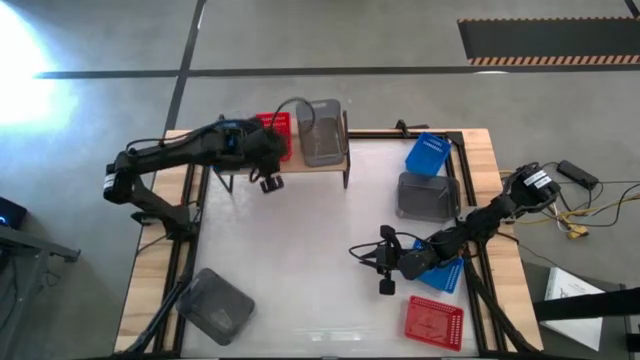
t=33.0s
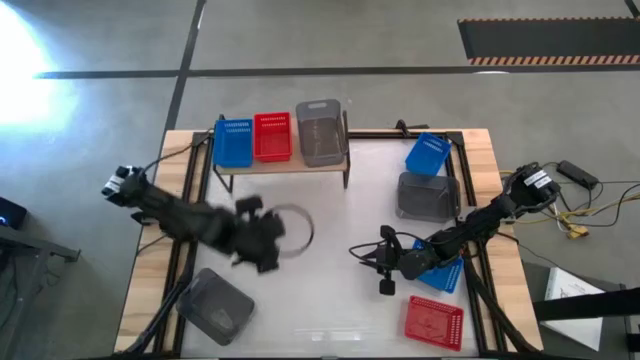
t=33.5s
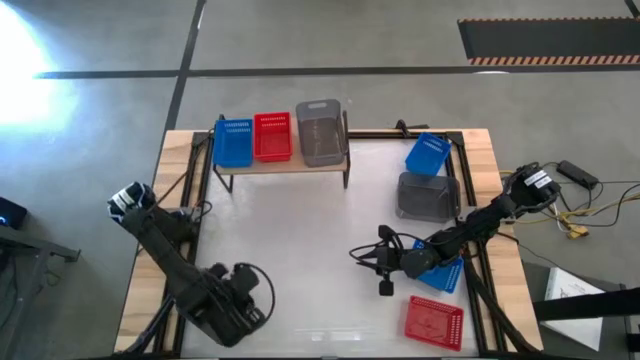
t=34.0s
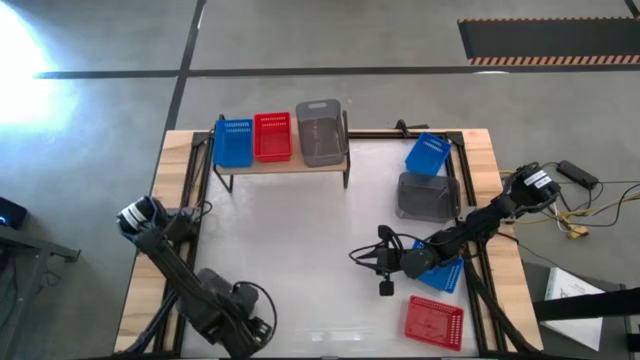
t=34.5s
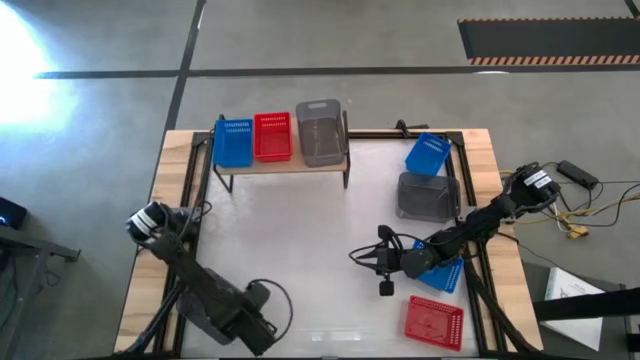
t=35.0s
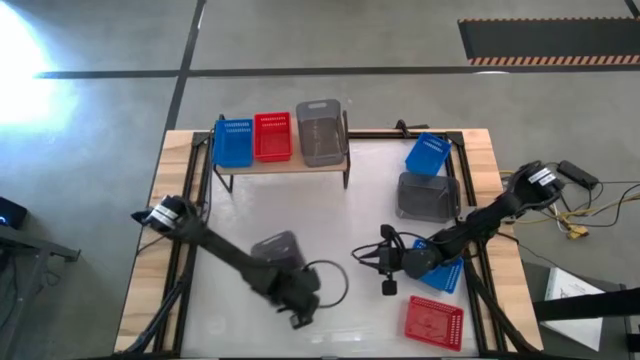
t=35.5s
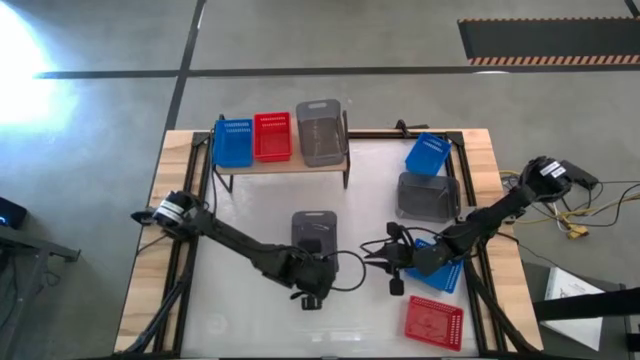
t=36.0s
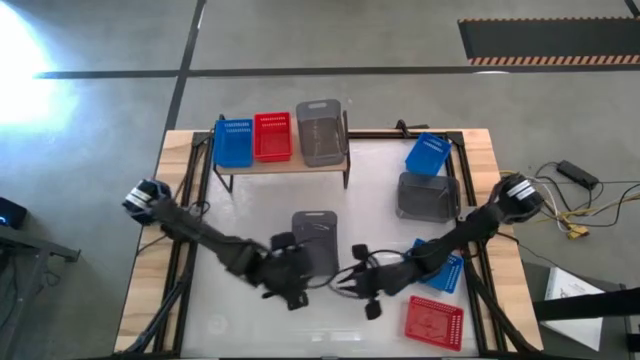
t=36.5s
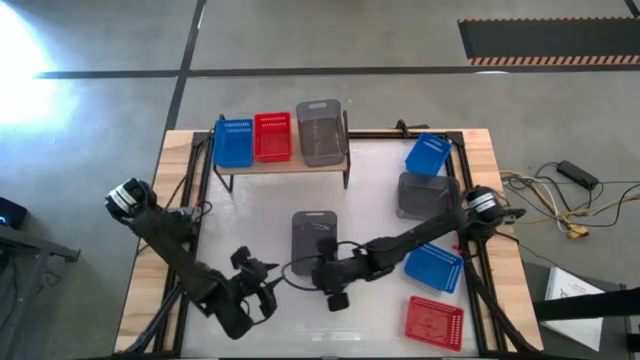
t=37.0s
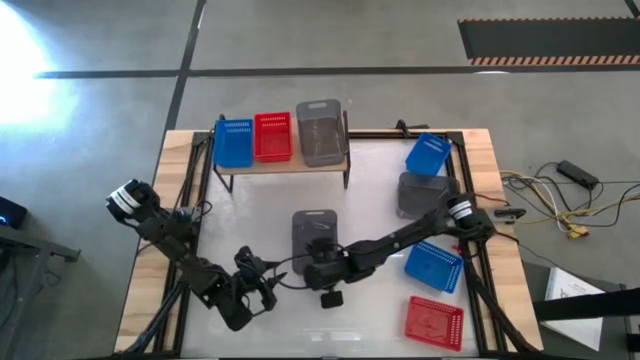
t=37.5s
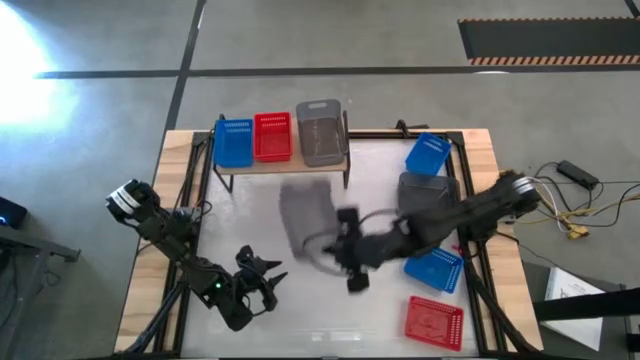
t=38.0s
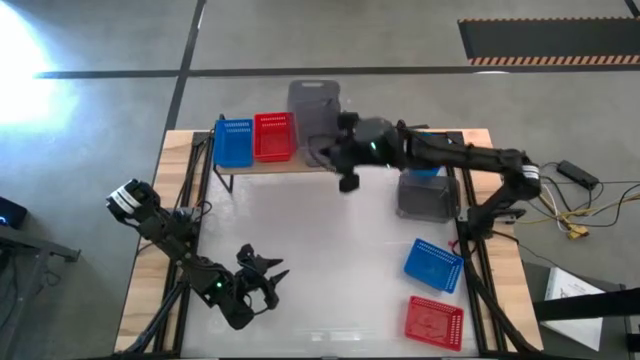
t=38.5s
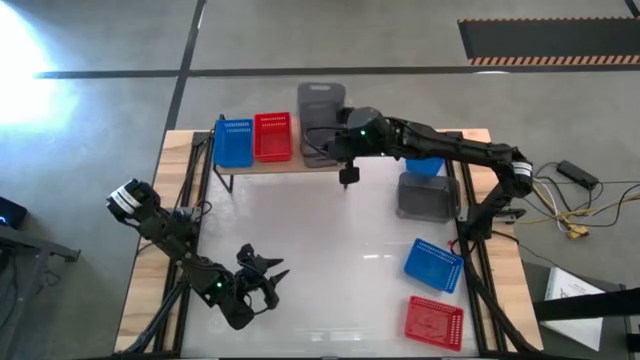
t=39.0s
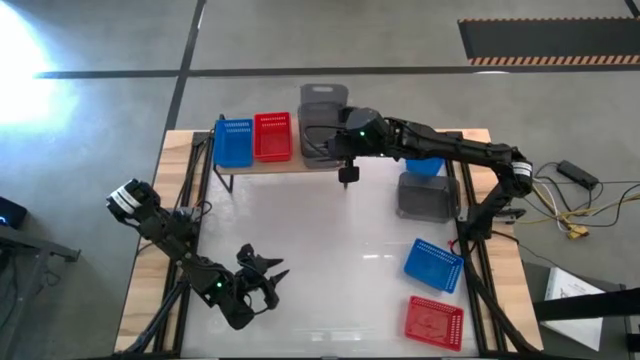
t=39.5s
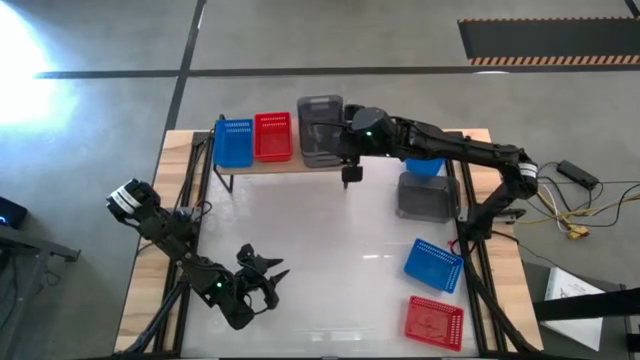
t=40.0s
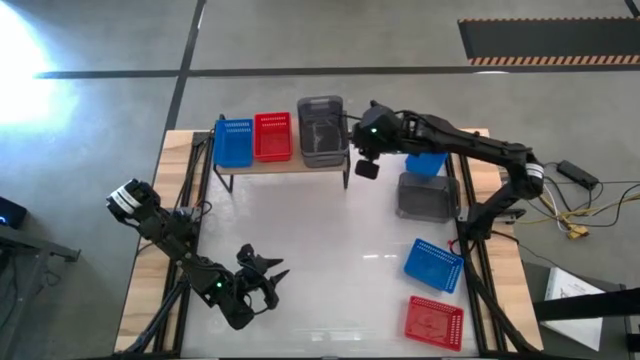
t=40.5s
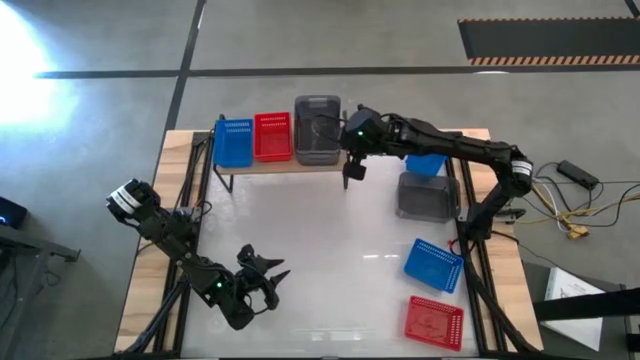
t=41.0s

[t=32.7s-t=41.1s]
Task: Stack baskets on shelf by color
Stack the bottom black bin on top of the black bin on the shelf

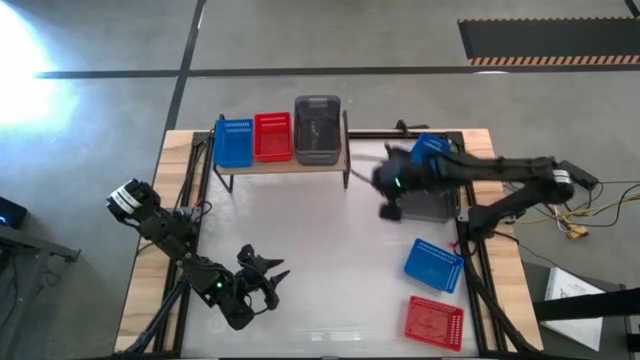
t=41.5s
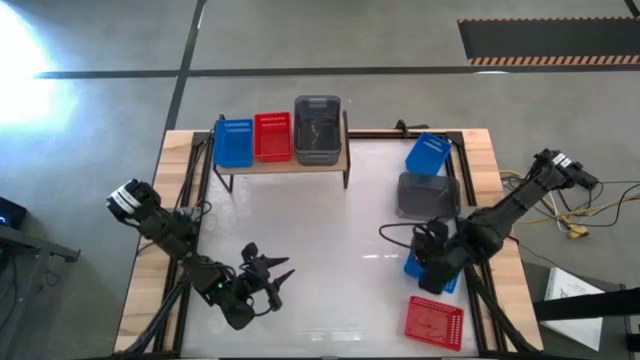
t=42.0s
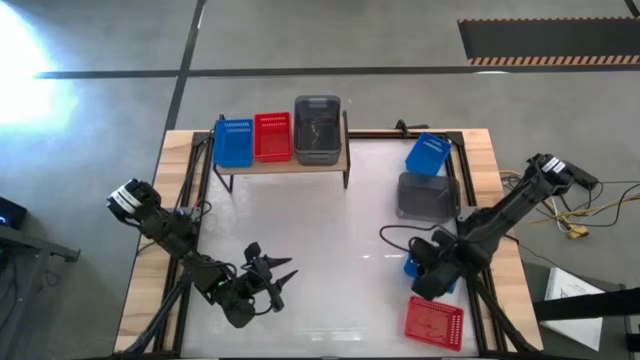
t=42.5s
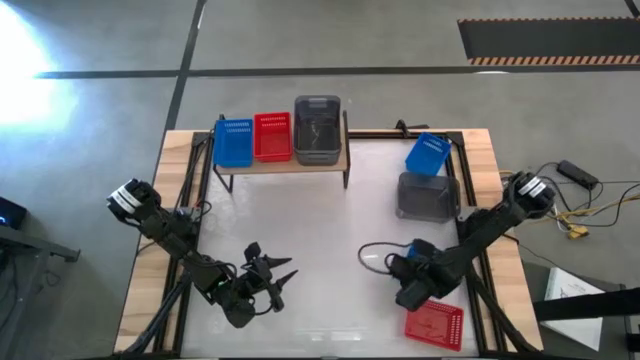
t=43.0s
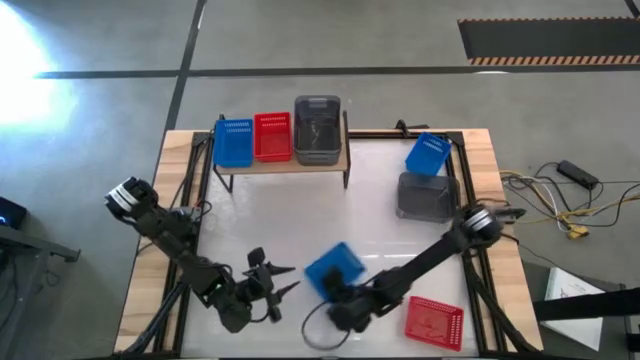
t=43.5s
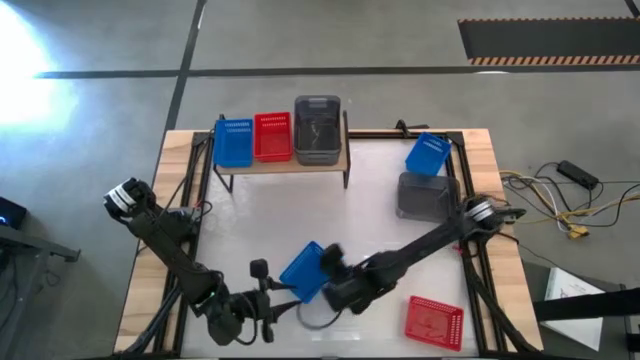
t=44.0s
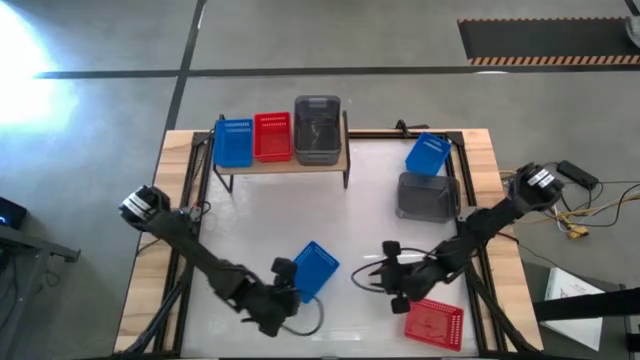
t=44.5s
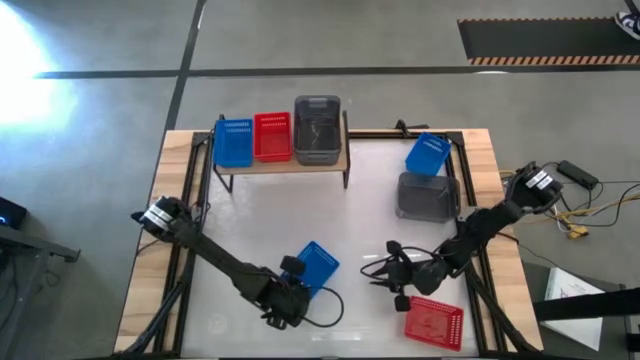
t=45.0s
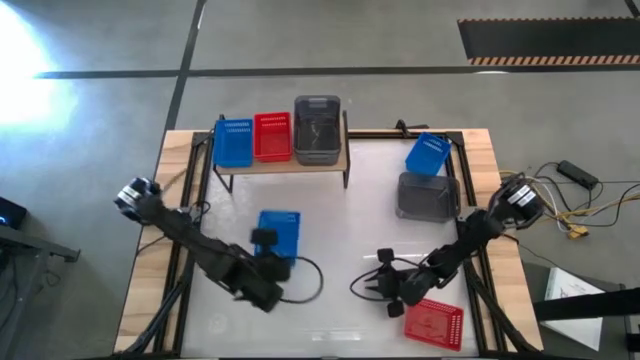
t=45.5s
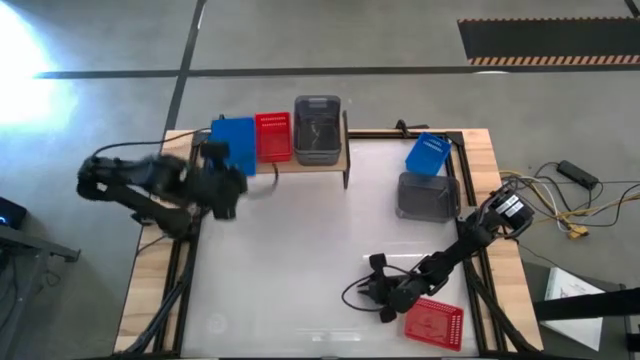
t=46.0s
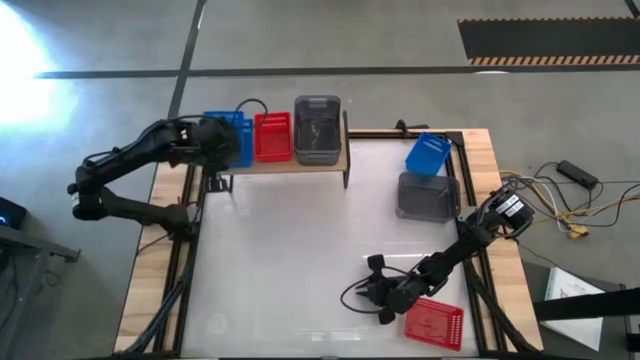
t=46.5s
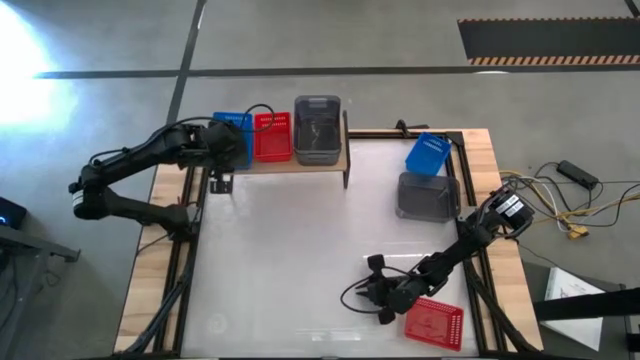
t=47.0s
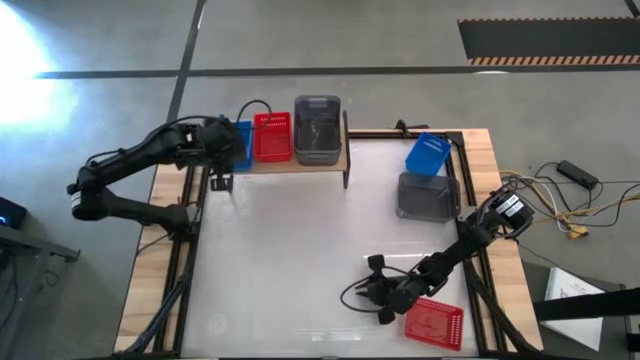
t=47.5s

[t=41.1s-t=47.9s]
Stack the bottom blue bin on top of the blue bin on the shelf

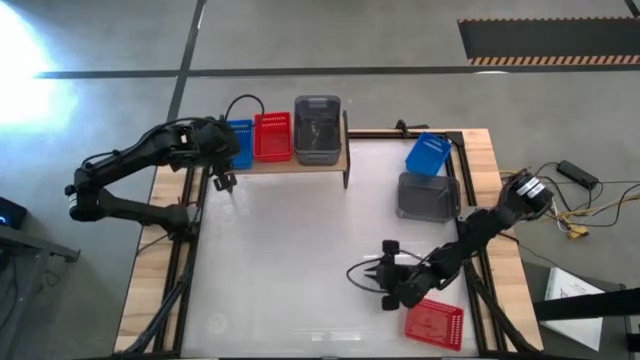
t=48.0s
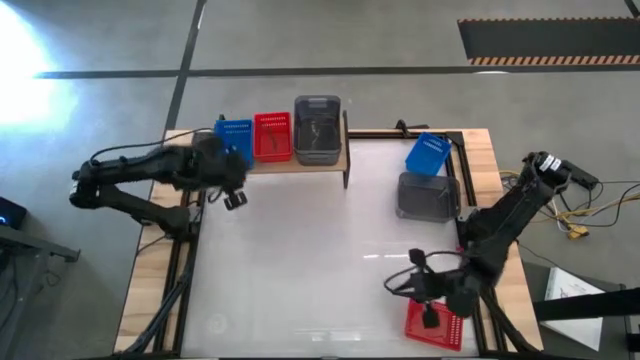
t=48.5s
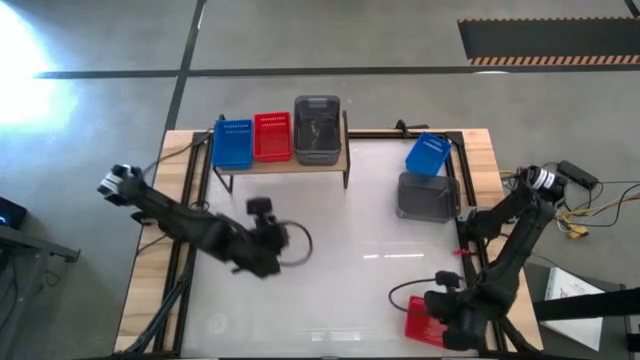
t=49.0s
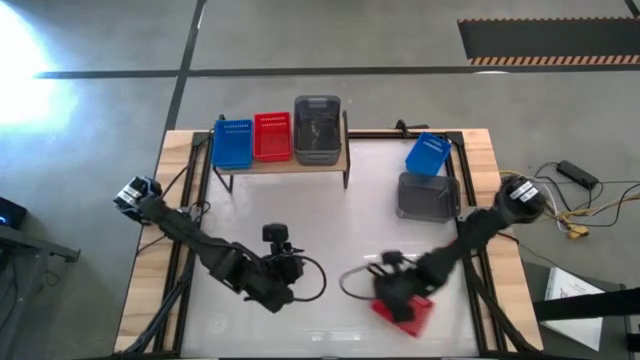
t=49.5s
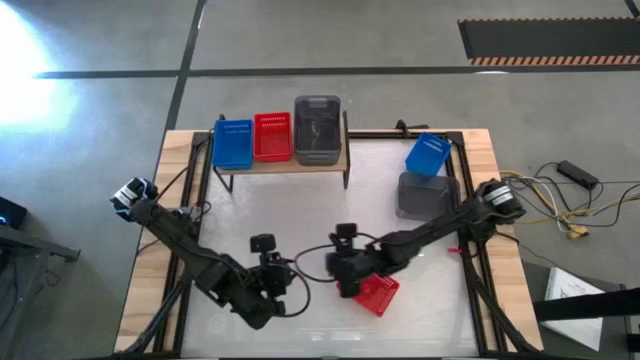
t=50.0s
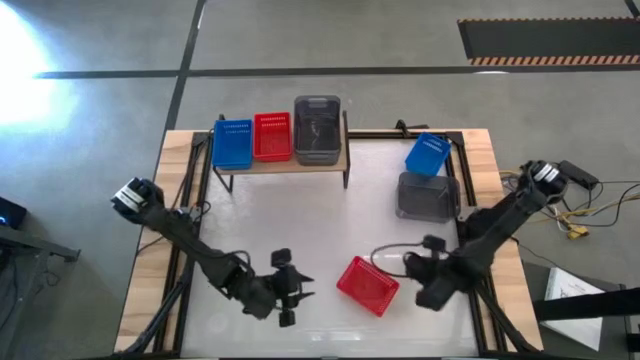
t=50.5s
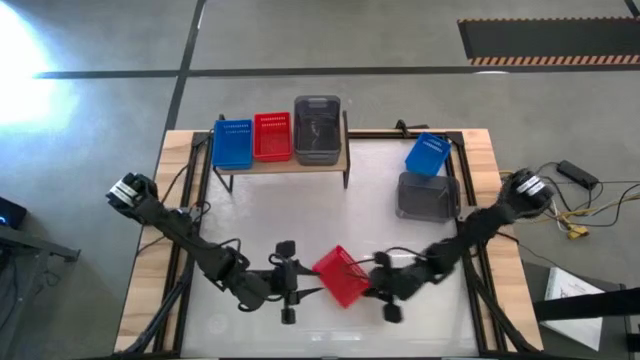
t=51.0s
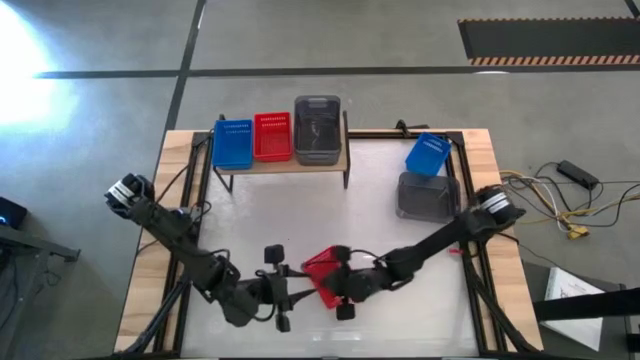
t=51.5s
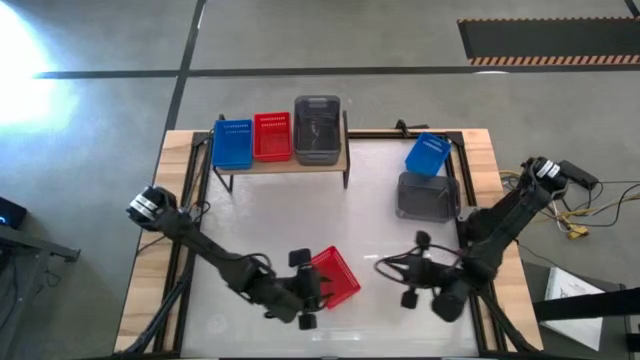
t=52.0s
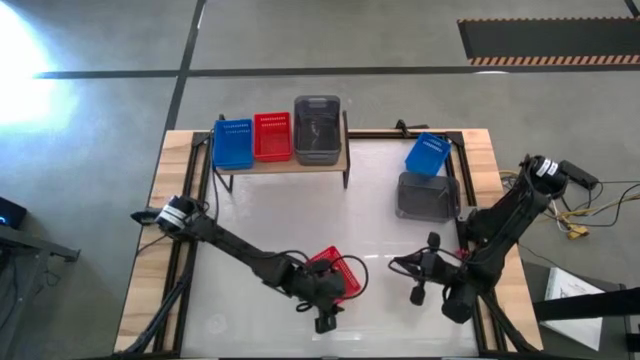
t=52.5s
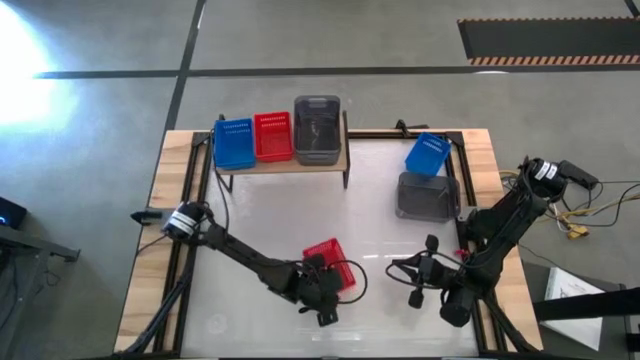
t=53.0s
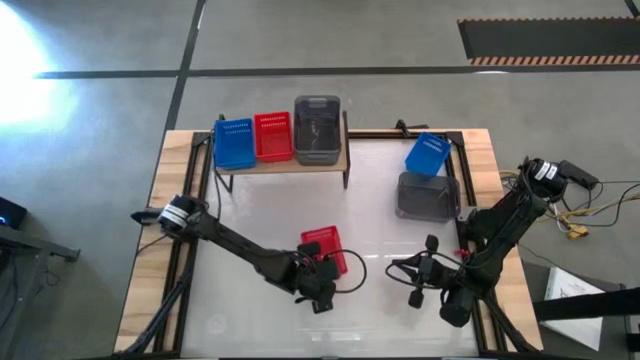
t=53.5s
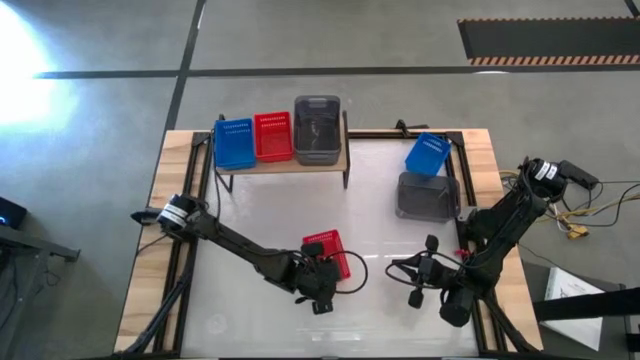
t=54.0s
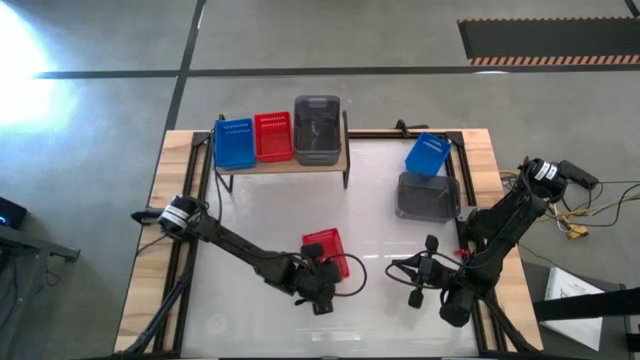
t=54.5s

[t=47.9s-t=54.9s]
Stack the red bin on top of the stacked red bins on the shelf
